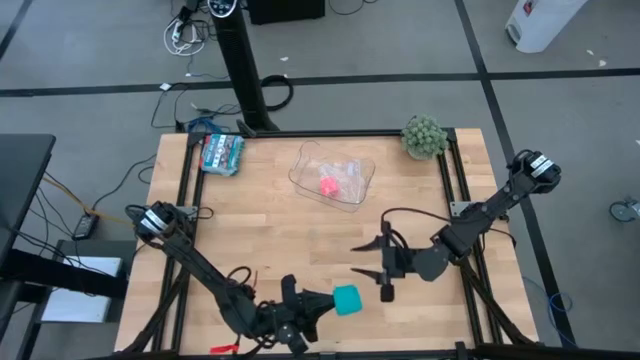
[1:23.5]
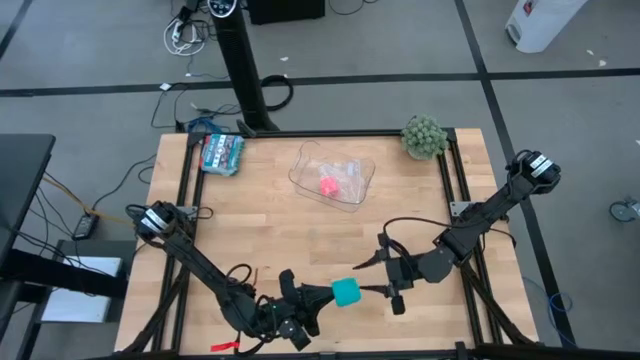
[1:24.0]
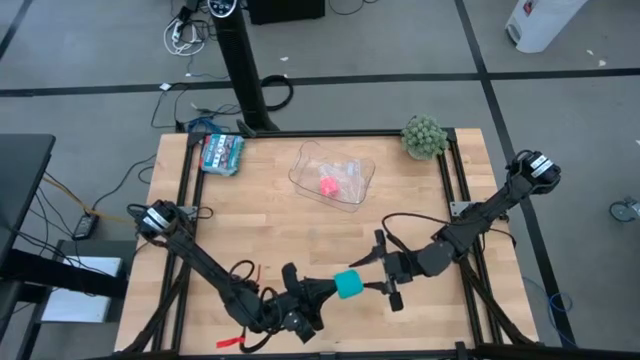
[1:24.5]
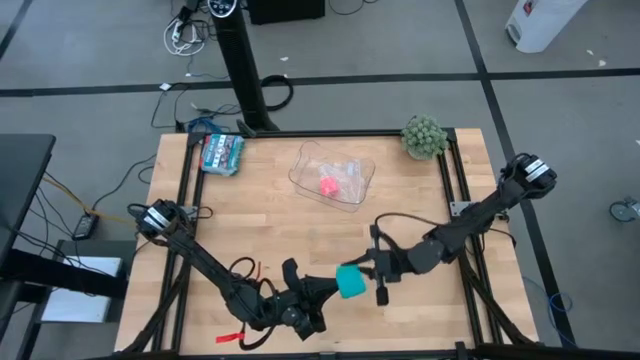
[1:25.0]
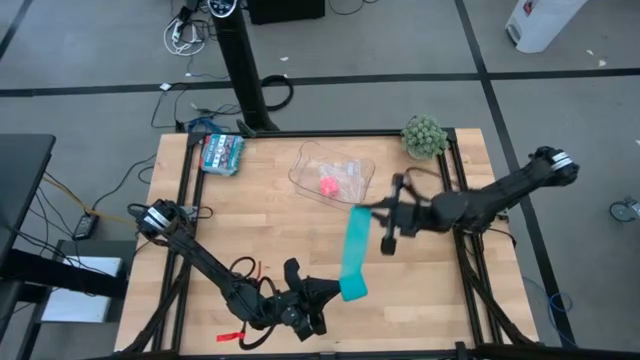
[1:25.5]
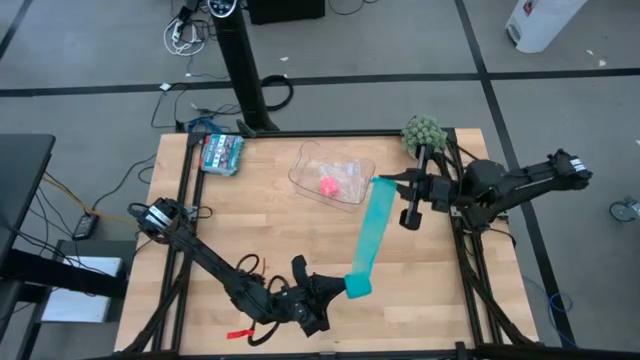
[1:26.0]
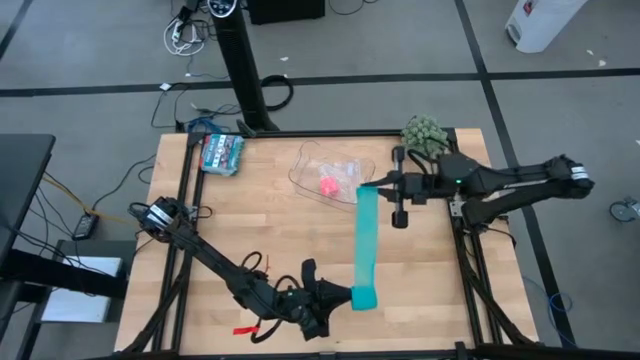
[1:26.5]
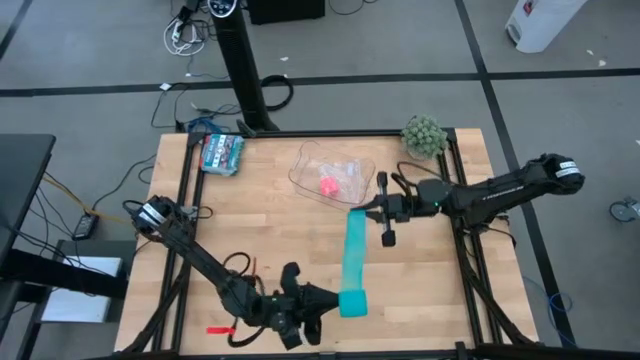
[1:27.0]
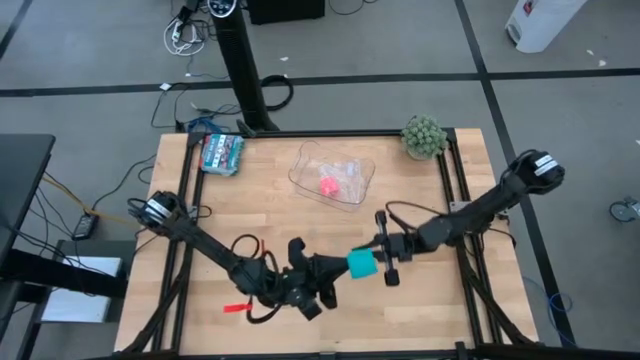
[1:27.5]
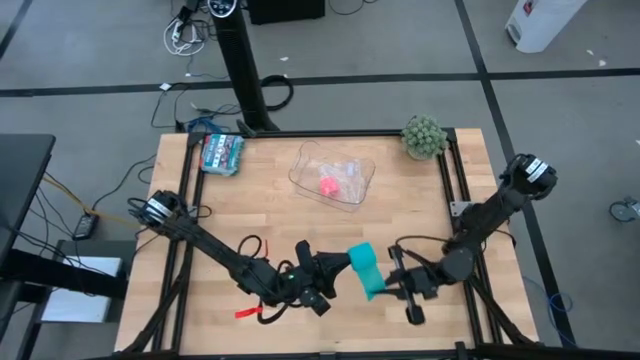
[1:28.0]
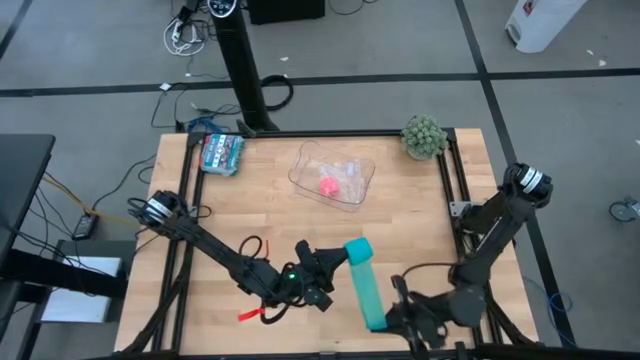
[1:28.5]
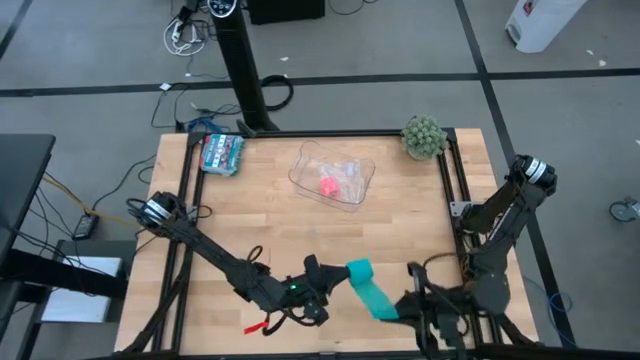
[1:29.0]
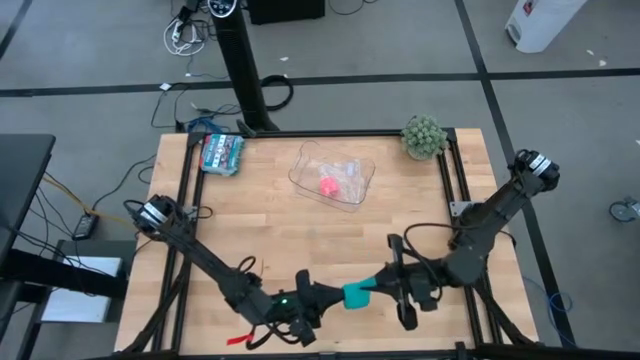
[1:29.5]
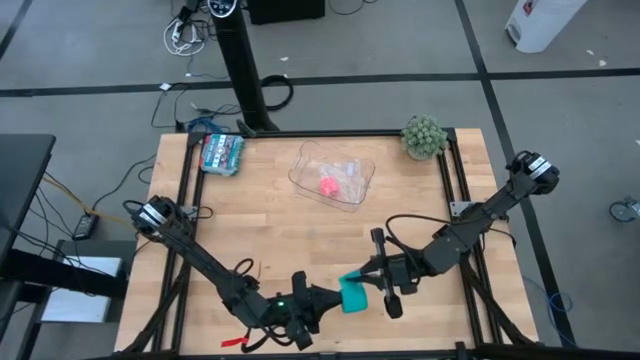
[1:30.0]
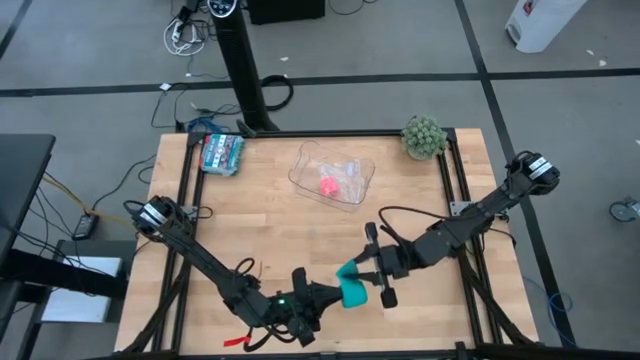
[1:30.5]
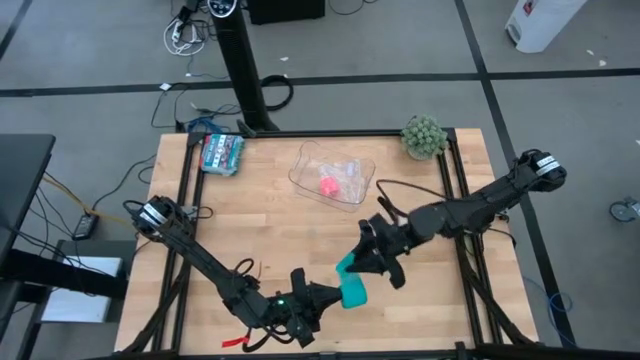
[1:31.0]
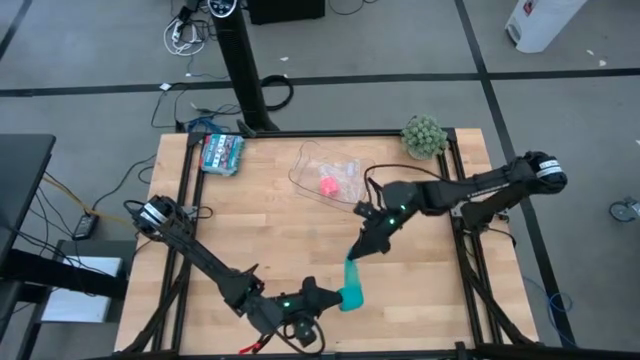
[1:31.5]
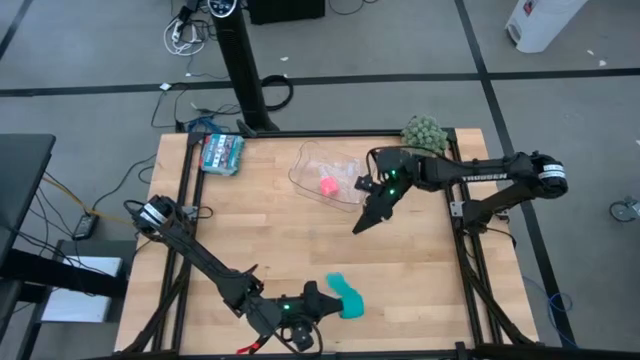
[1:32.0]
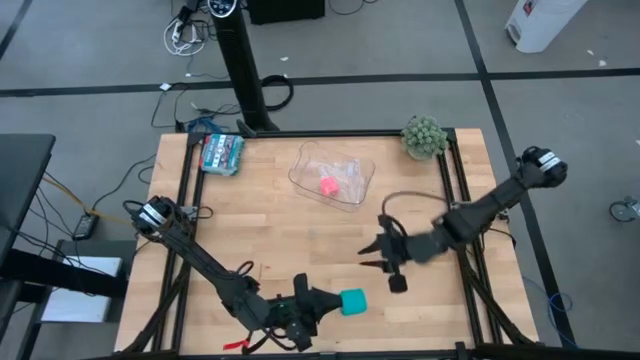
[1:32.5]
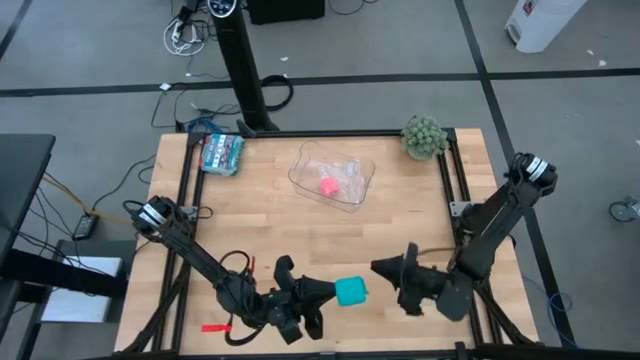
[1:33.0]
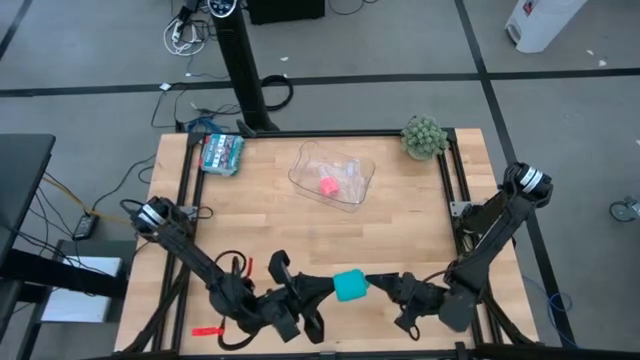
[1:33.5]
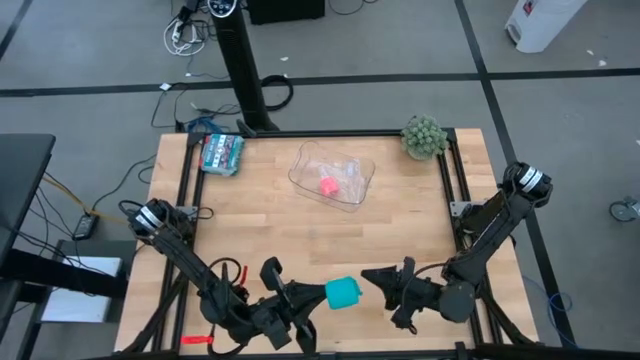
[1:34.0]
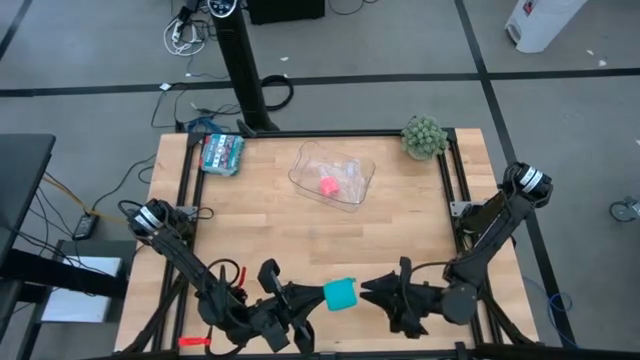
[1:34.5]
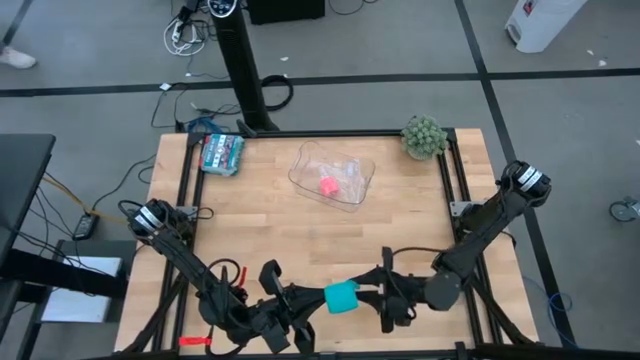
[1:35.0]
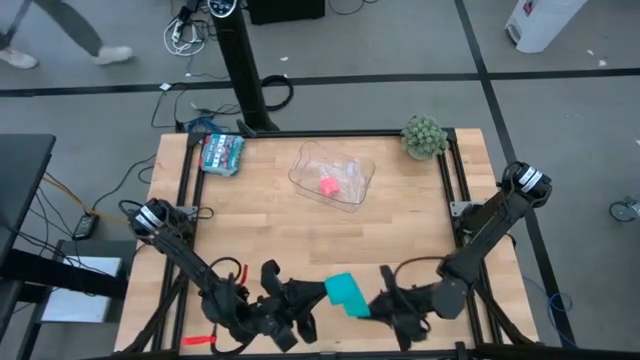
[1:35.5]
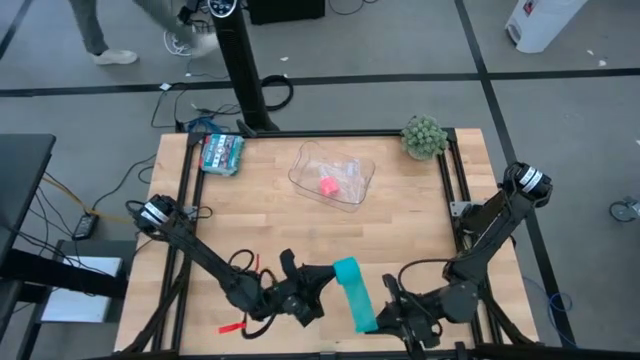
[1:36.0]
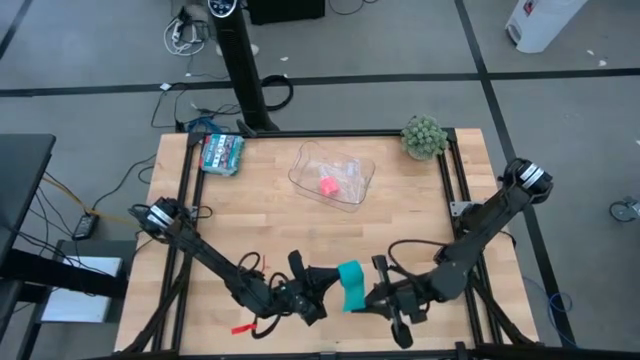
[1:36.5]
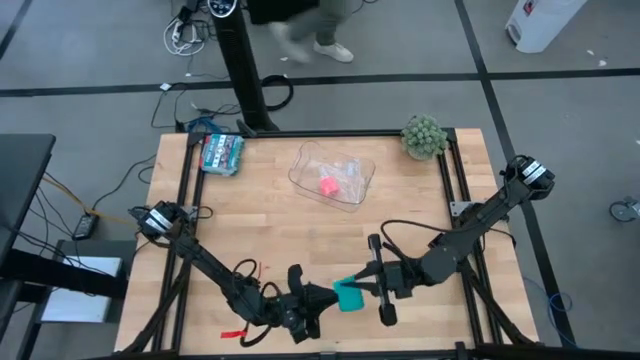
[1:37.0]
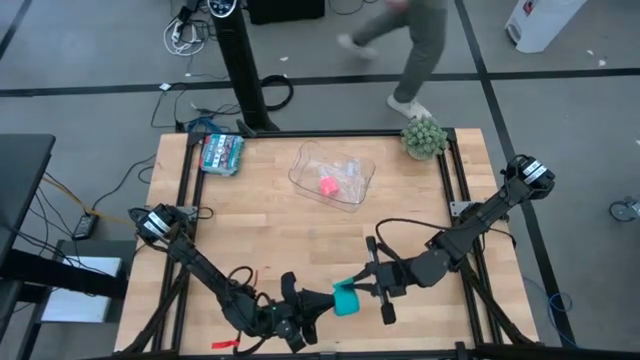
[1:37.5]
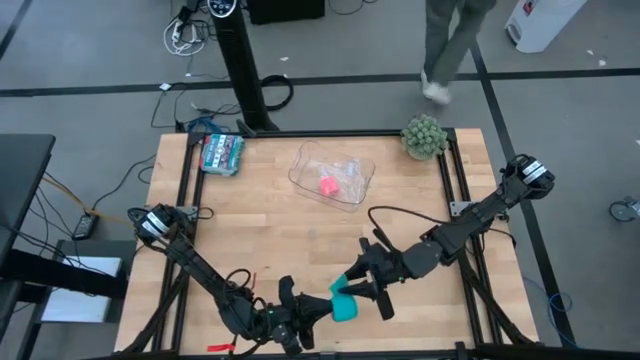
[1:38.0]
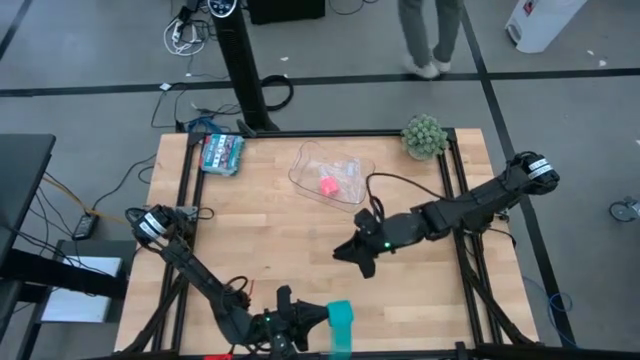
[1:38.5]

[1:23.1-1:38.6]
Task: Roll bandage
Roll the blue bandage

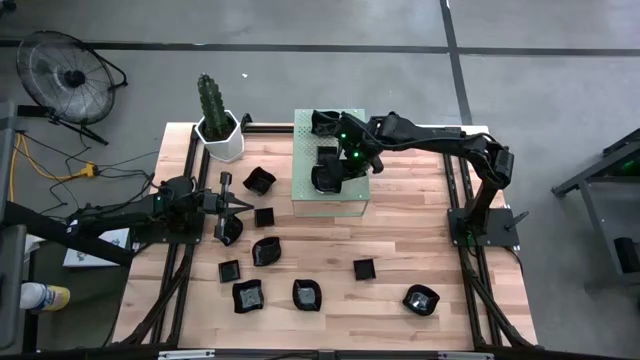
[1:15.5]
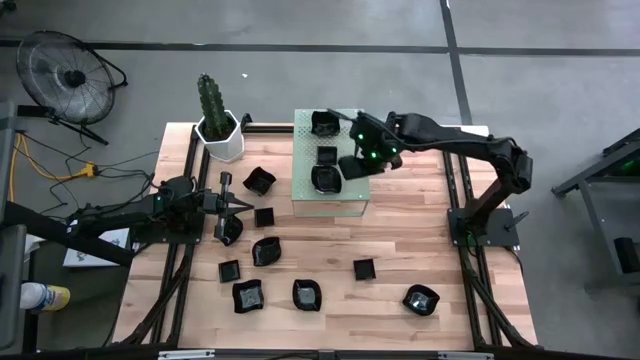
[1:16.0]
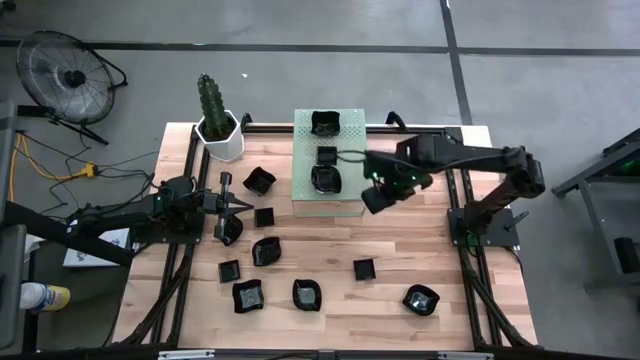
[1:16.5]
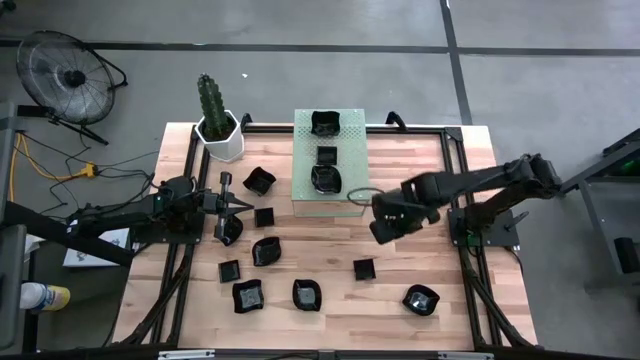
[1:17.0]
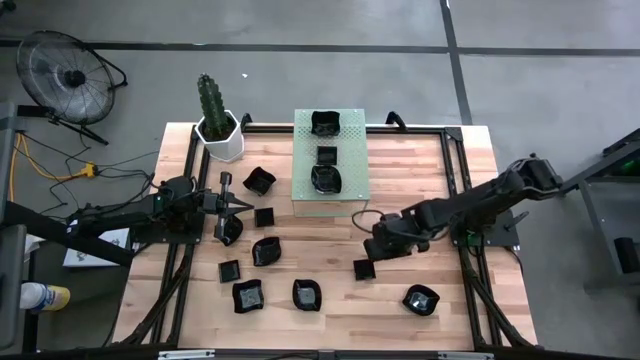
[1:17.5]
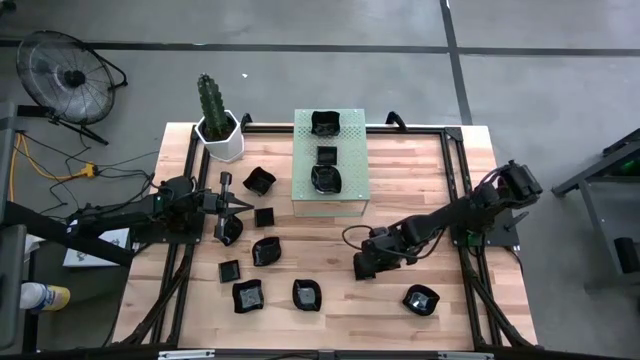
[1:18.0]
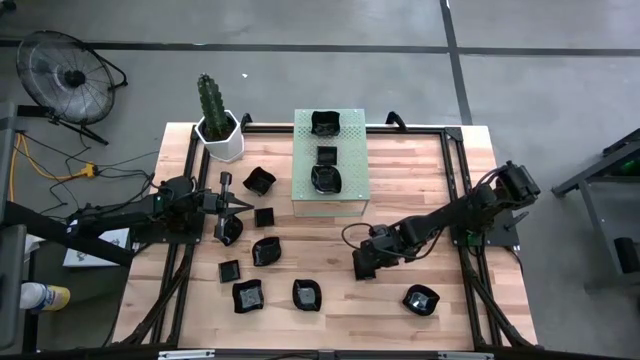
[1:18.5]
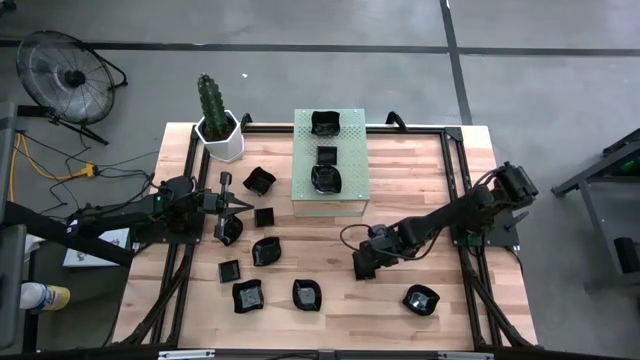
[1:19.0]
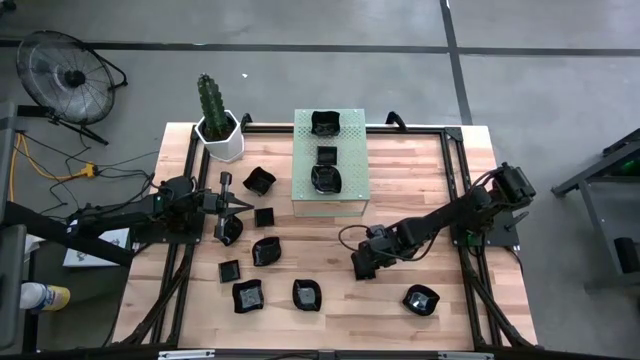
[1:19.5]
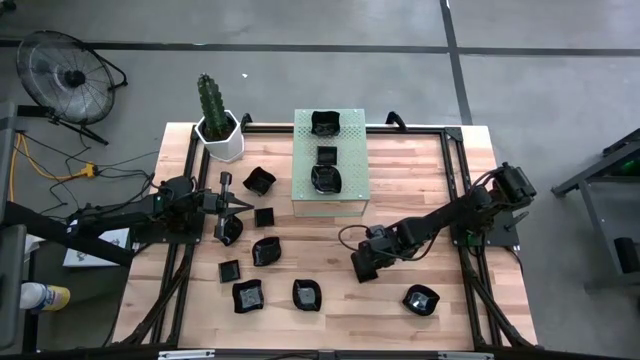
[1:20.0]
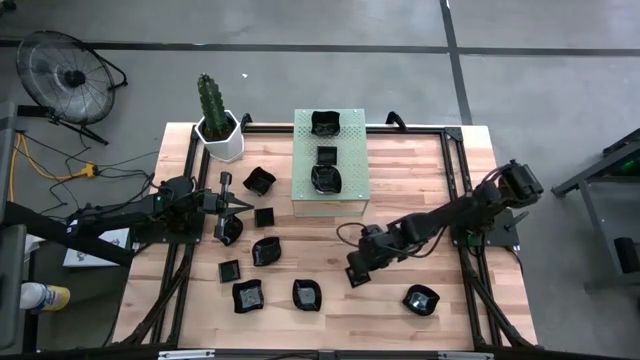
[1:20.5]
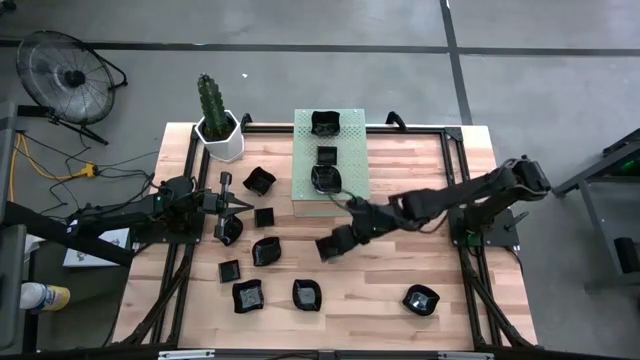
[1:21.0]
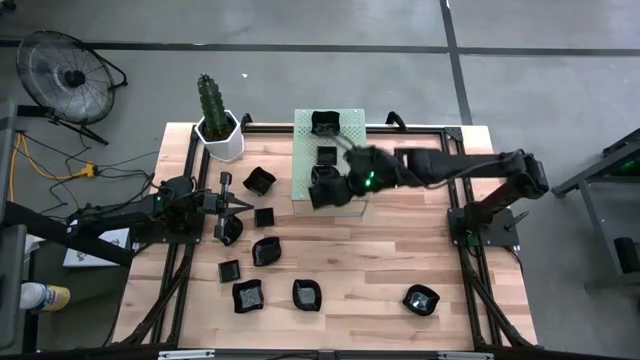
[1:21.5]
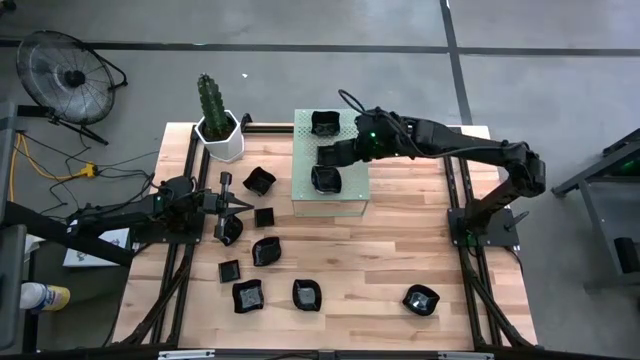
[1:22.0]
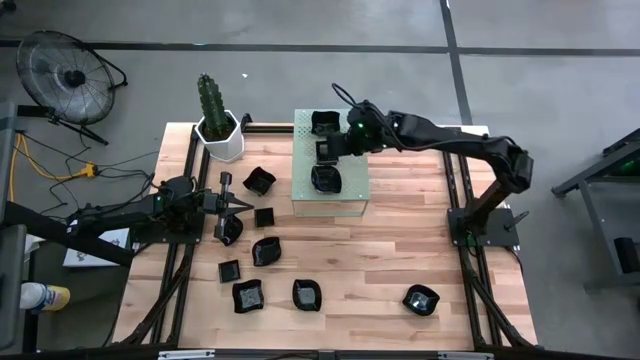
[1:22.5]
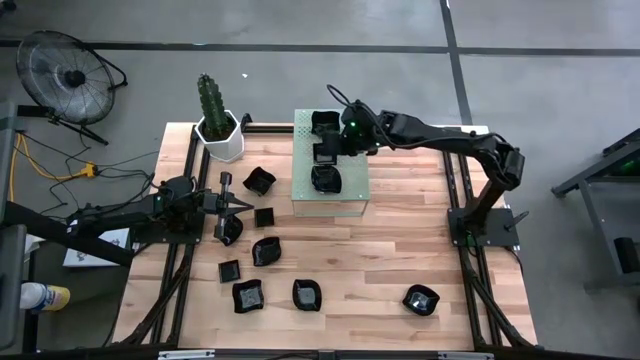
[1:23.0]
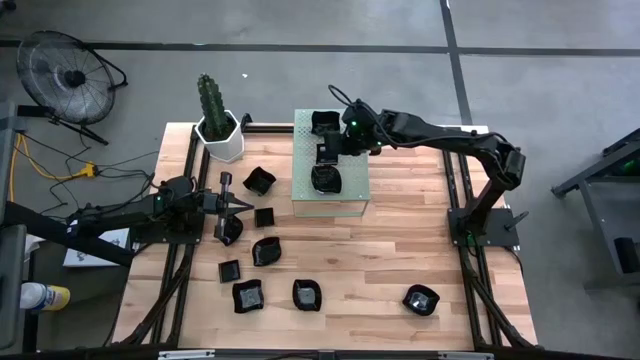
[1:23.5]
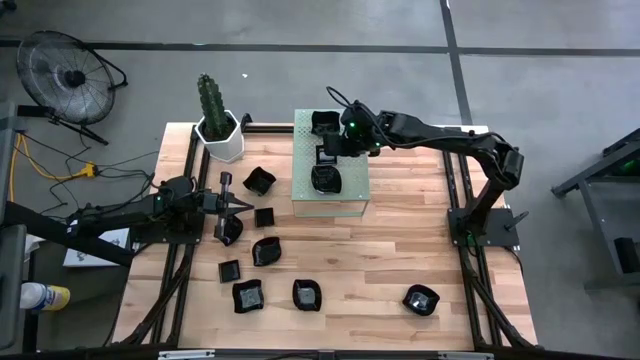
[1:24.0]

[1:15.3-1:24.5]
Task: Pick & Place Mini shaped plates
Stack the black square plate on top of the black square plate on the shelf
